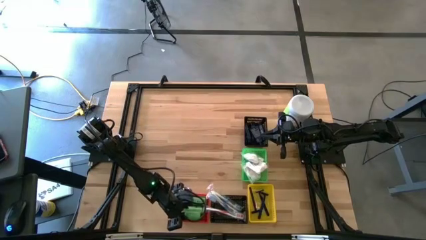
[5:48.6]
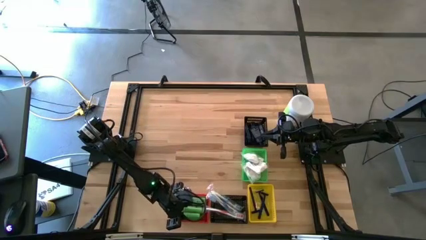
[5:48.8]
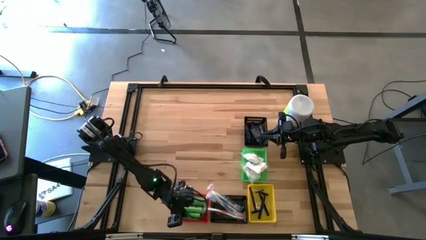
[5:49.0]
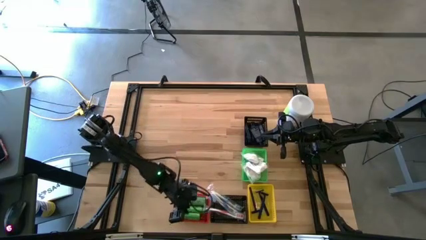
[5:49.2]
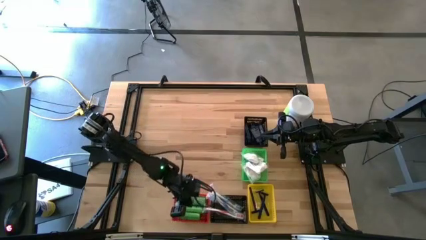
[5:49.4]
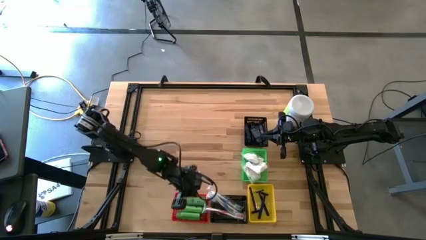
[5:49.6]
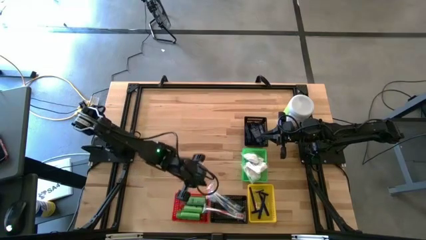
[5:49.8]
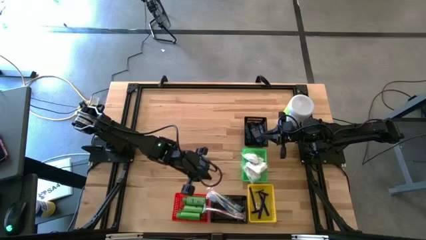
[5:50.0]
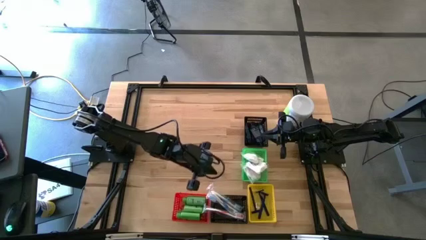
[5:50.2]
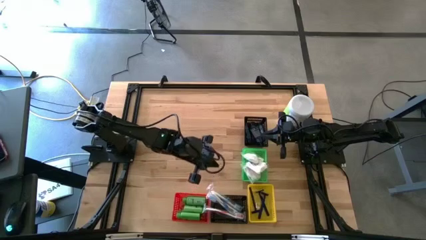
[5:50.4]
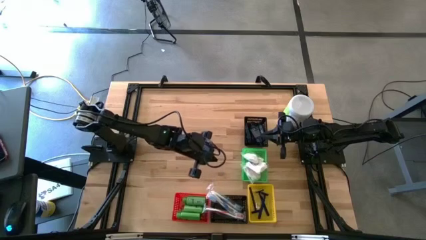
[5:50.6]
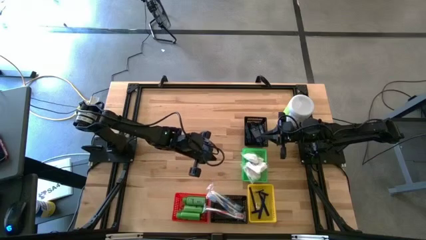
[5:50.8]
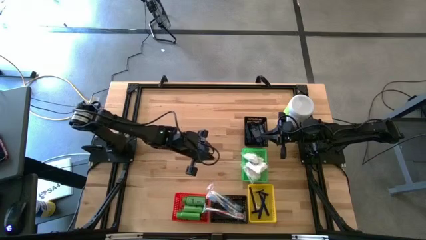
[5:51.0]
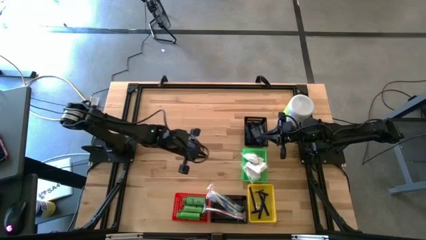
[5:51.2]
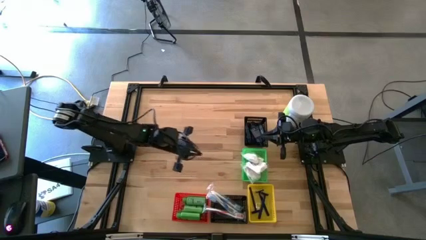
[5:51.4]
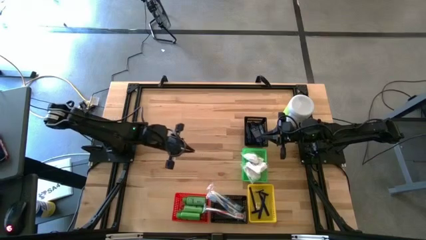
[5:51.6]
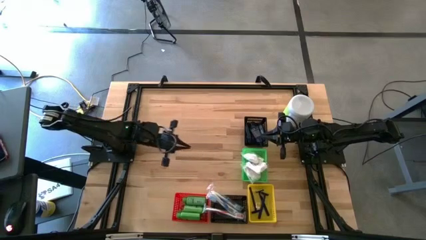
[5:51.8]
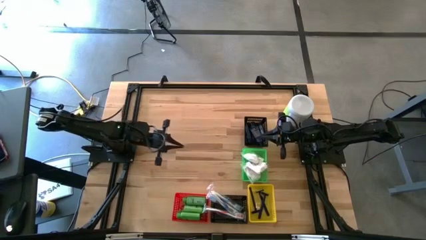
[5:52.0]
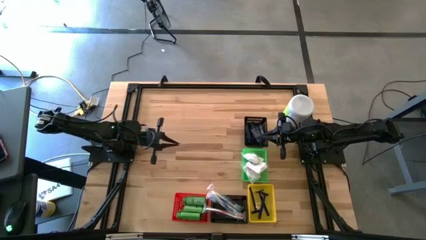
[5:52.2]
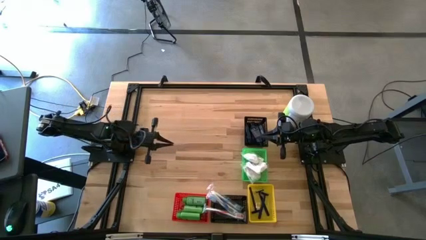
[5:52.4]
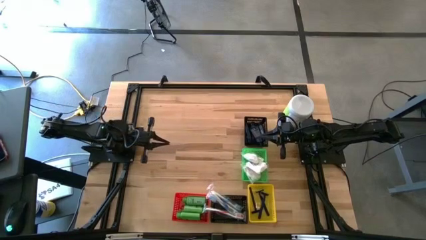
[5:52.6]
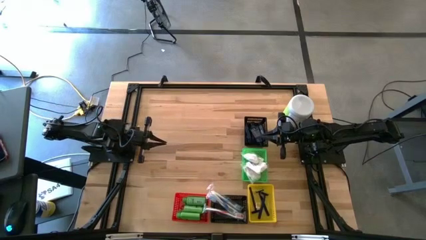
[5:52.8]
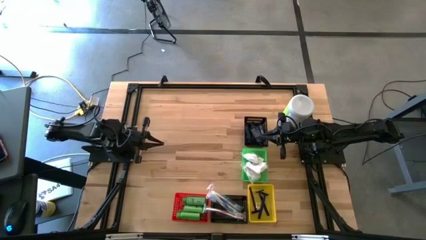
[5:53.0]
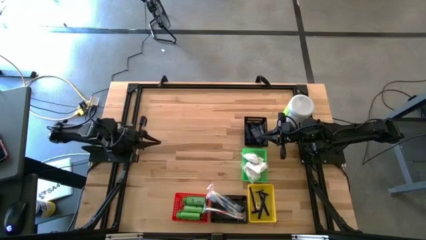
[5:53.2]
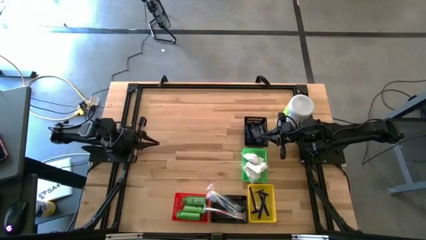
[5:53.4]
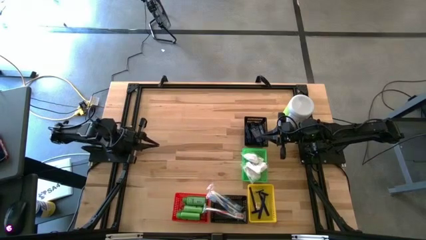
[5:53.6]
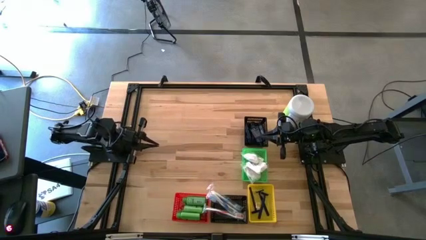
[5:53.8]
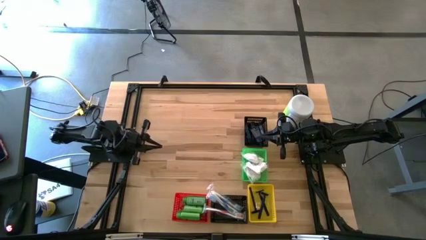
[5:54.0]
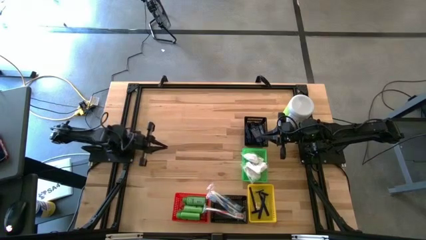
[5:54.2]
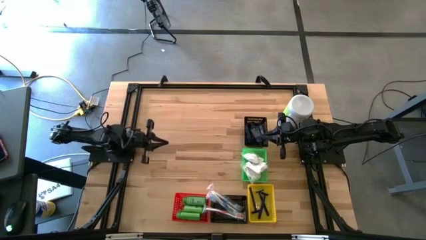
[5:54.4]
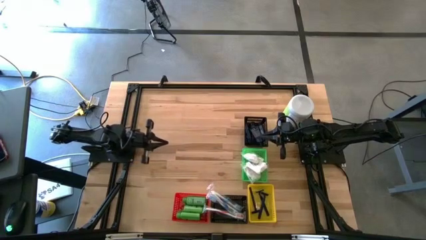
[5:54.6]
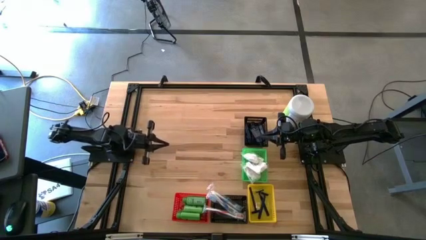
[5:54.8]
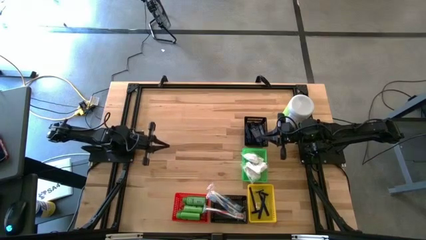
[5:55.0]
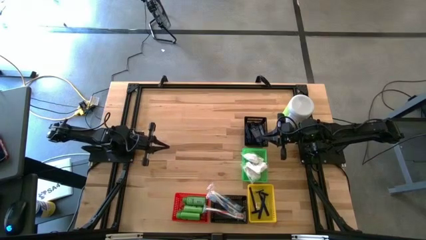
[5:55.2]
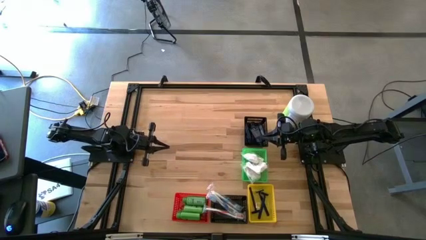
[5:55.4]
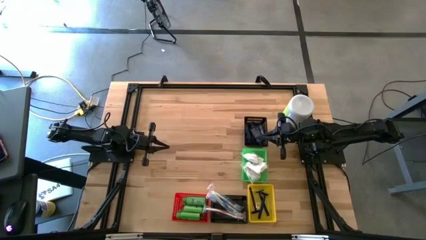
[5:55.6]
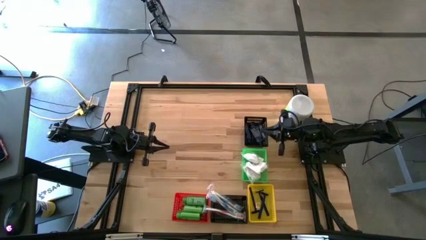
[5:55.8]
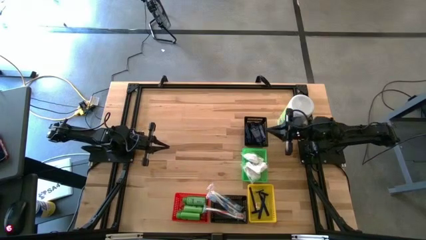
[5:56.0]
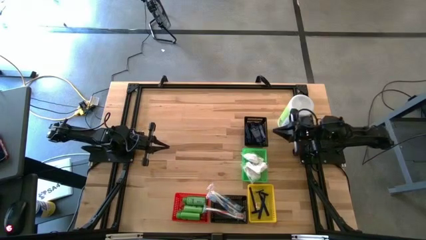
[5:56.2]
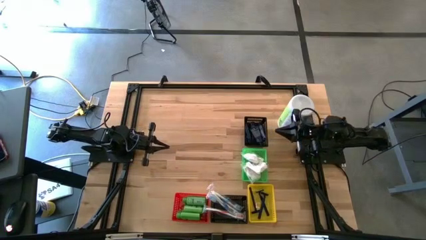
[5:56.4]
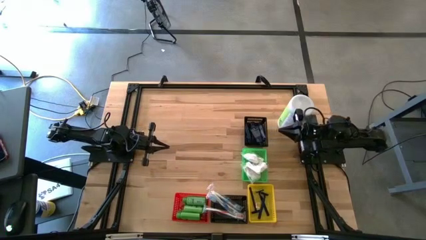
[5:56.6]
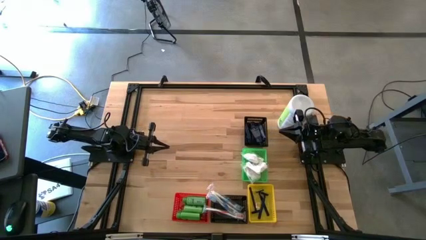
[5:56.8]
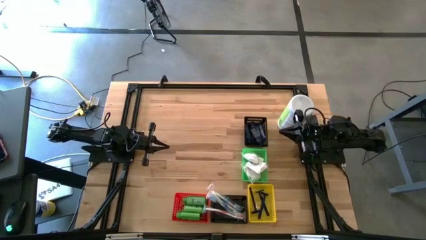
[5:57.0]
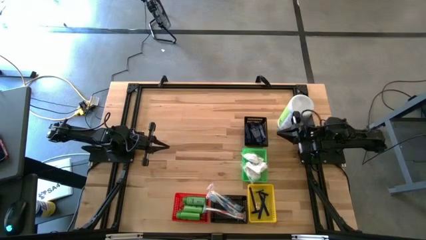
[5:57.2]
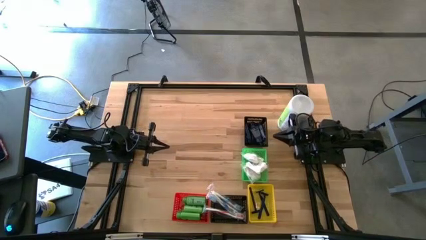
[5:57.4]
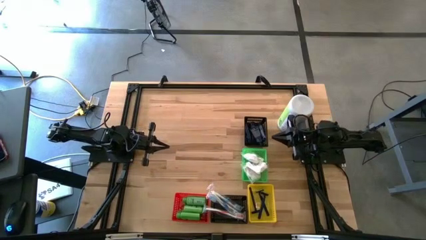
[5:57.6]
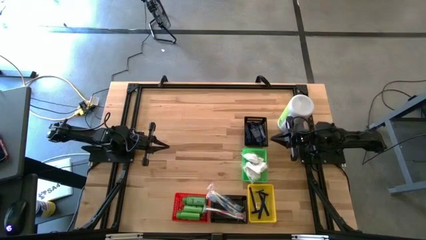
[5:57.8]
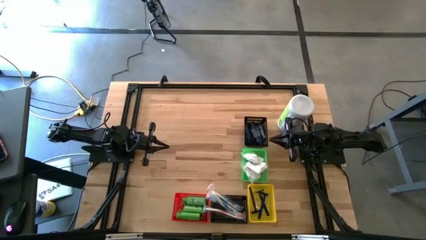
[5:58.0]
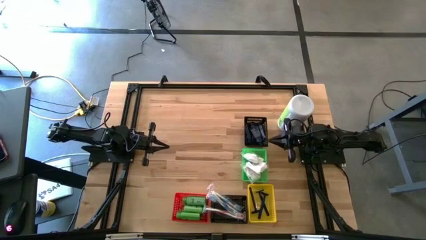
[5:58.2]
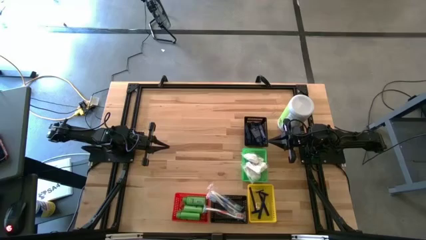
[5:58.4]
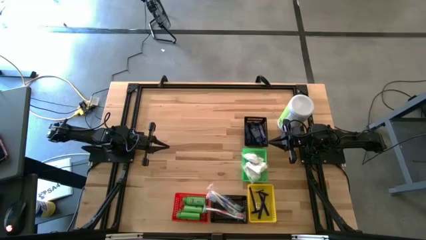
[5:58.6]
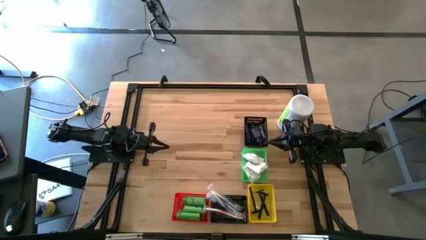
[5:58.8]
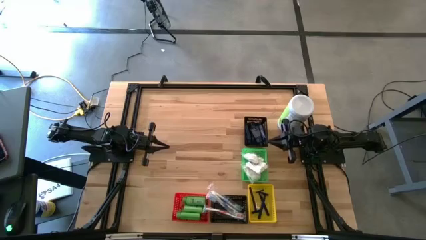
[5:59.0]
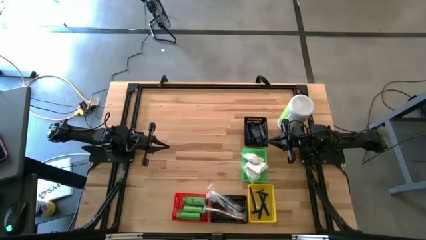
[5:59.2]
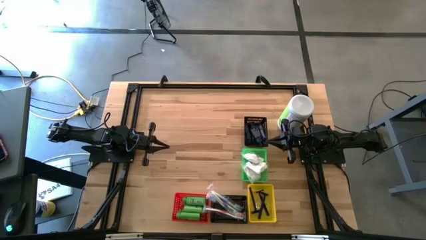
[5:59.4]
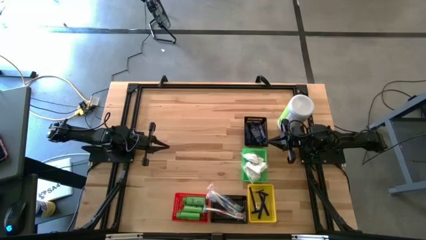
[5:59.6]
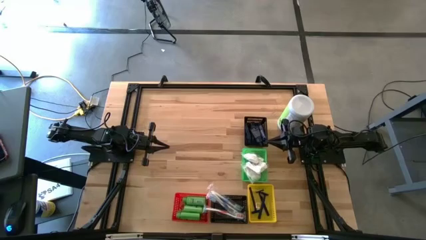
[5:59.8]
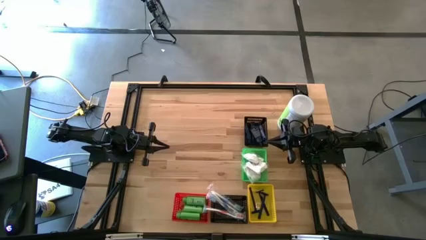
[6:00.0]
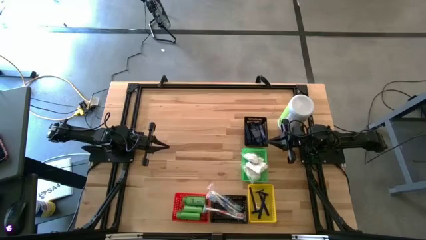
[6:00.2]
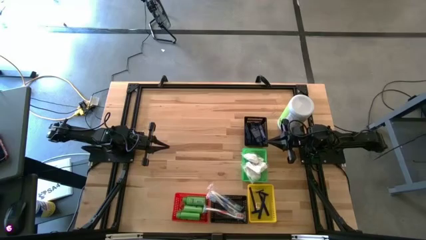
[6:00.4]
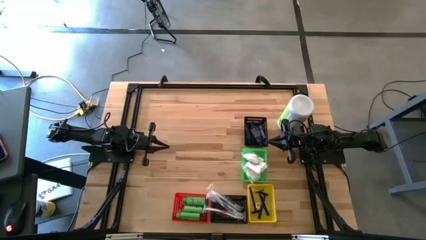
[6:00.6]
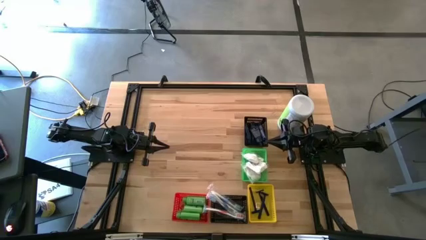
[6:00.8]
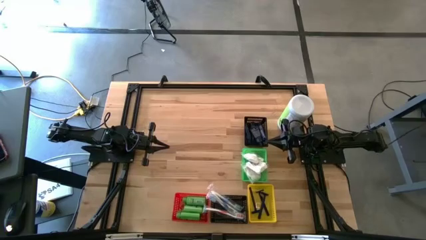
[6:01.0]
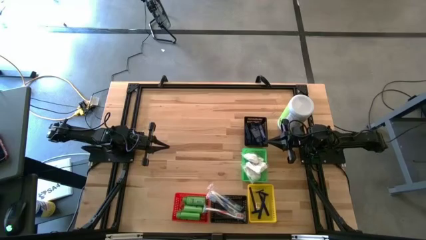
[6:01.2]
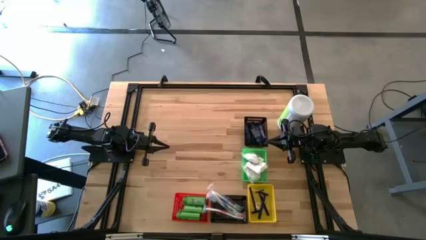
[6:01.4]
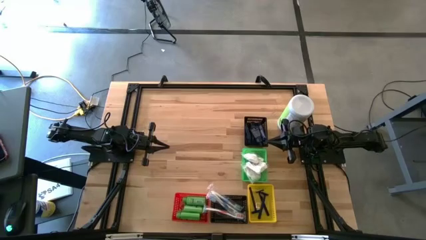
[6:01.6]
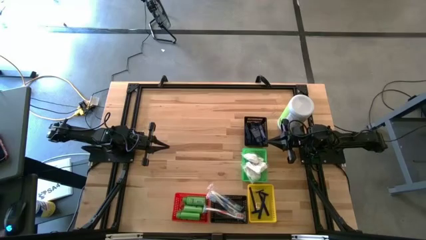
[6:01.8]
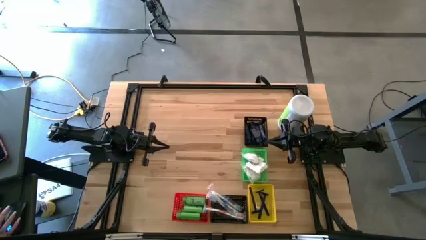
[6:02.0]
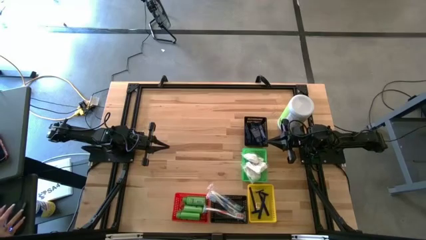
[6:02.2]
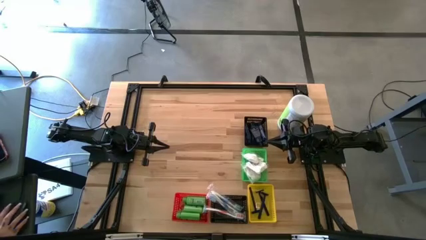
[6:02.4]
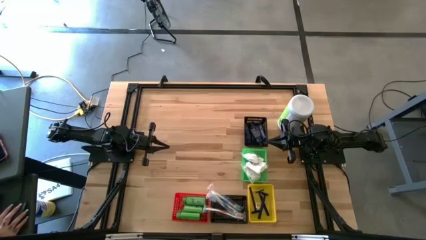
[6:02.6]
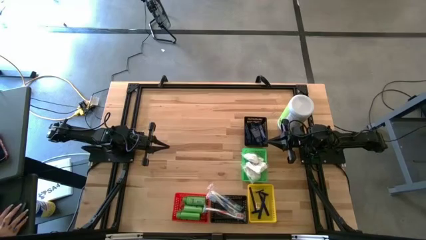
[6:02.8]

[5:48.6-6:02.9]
Task: Pick & Place Travel size toiletries
Return to Home Position
